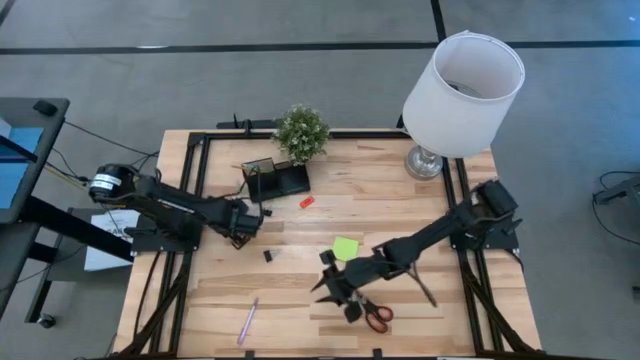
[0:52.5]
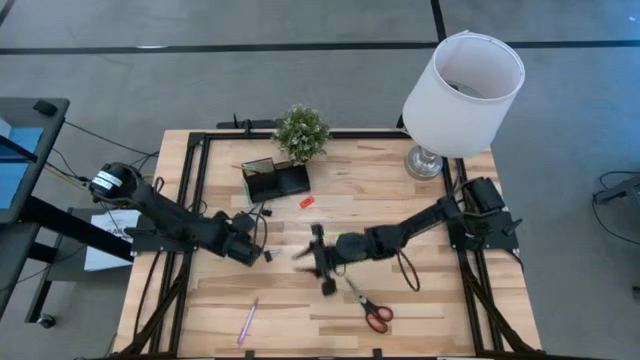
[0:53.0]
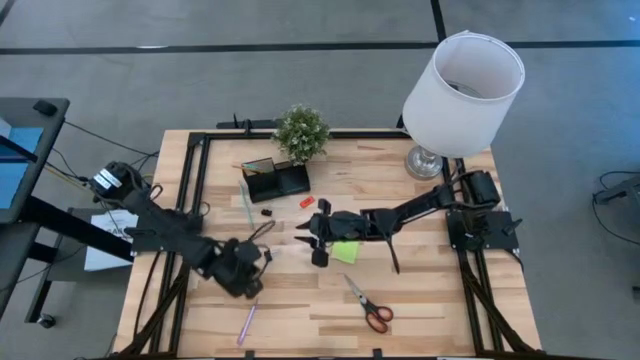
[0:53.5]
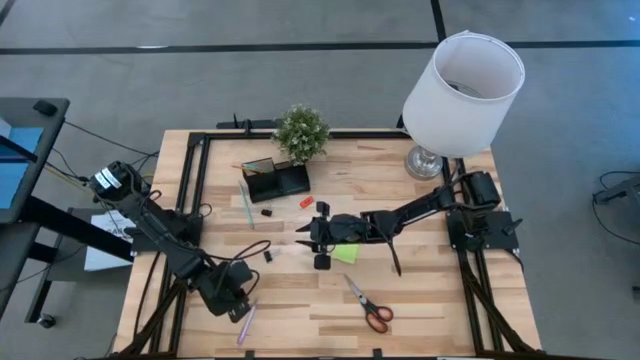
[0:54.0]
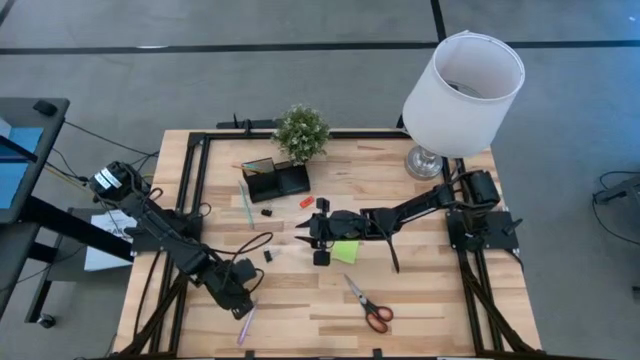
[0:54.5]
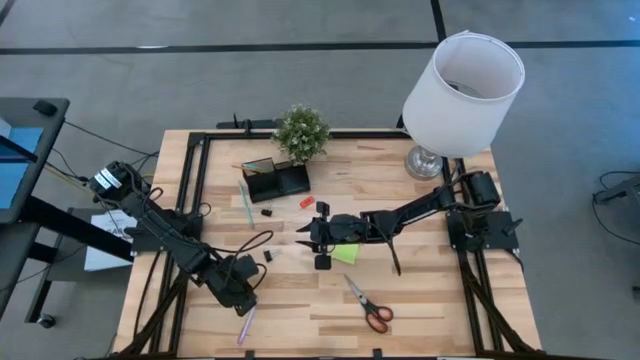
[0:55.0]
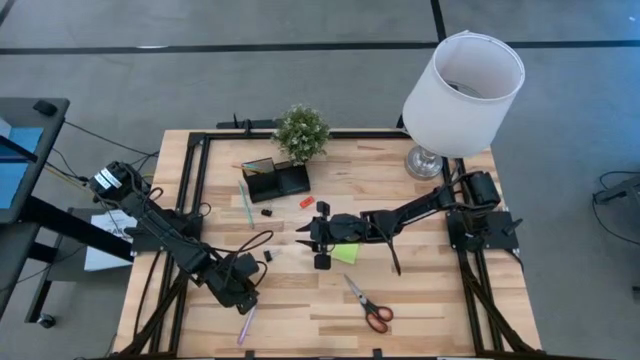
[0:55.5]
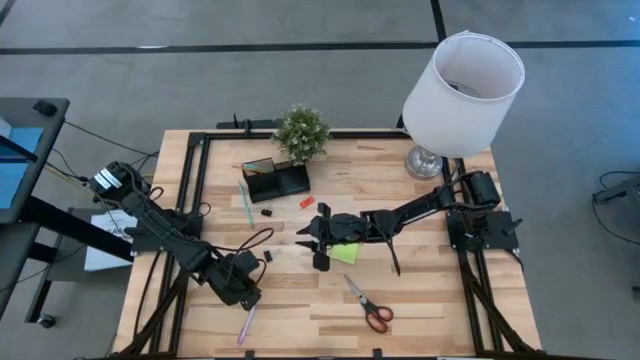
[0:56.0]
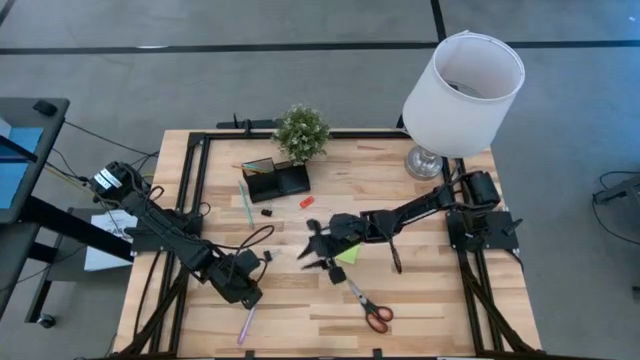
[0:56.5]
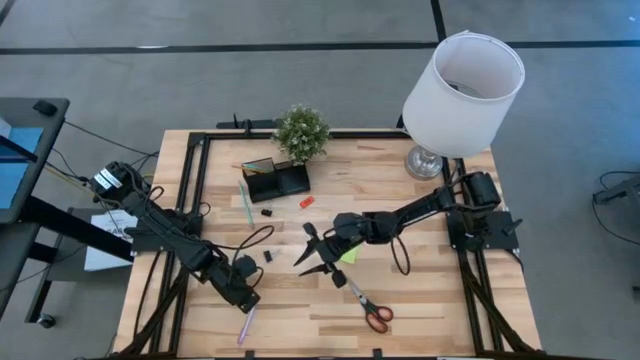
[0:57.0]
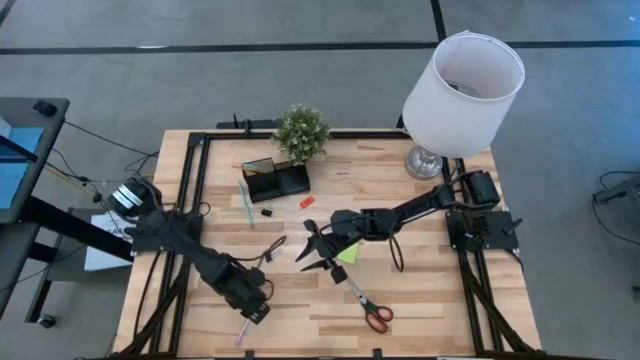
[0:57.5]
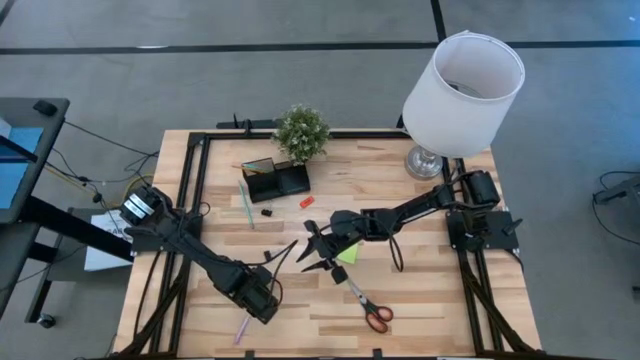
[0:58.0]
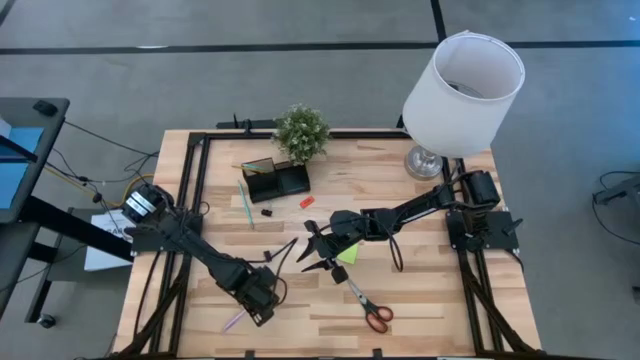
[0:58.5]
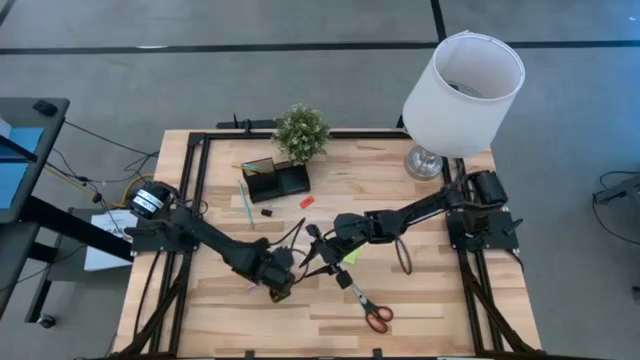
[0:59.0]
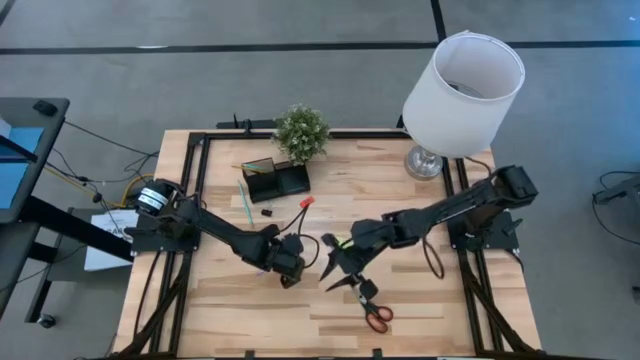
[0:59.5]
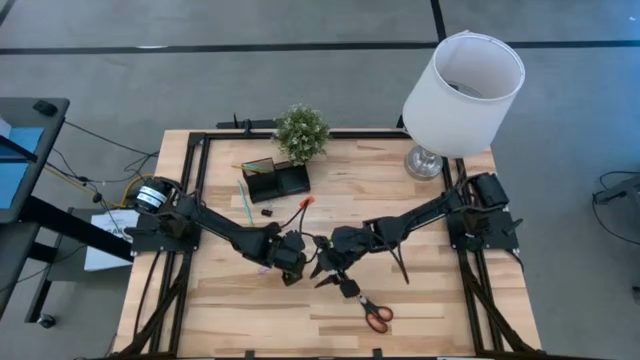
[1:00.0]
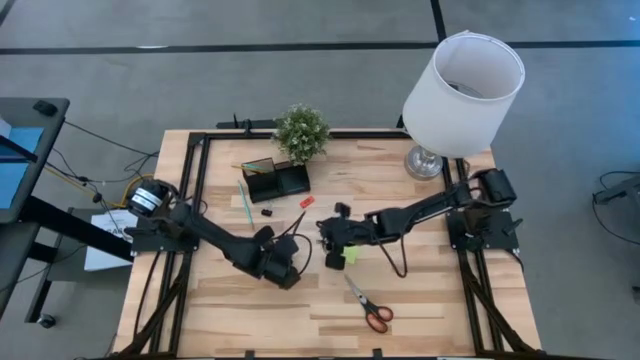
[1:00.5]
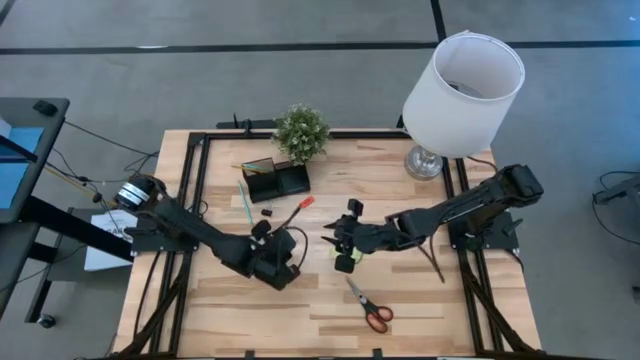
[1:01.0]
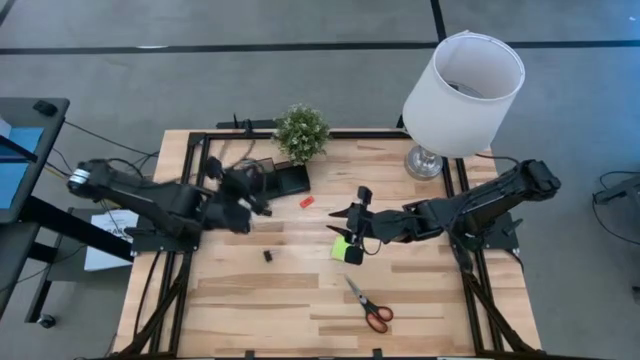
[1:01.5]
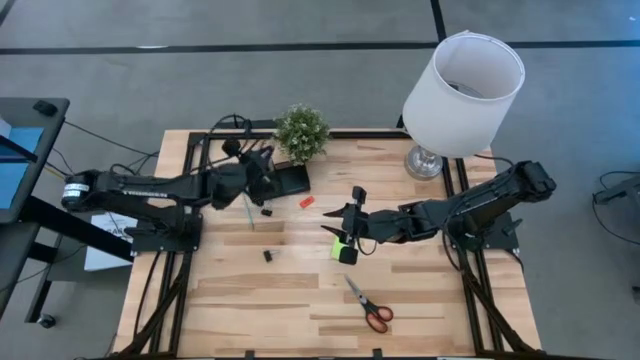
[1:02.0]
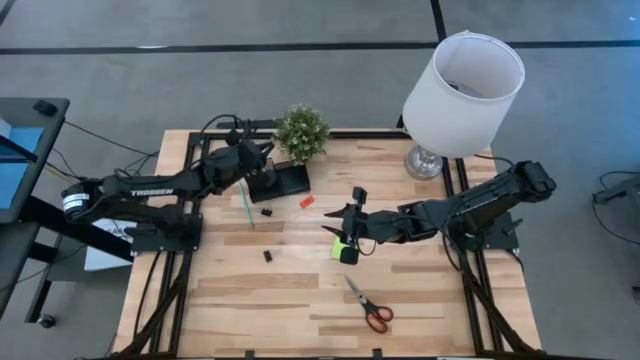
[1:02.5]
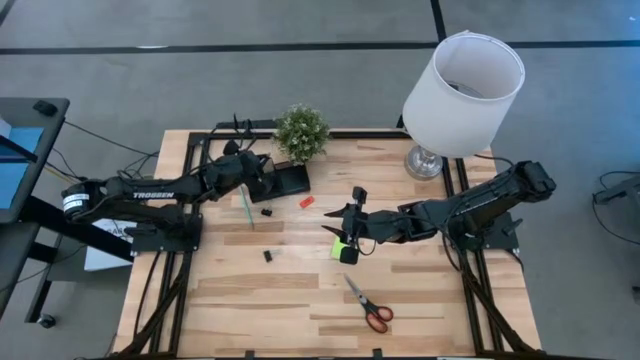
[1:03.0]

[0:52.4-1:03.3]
Task: Pick and place office supplies into organizer
Put the purple pen into the black organizer

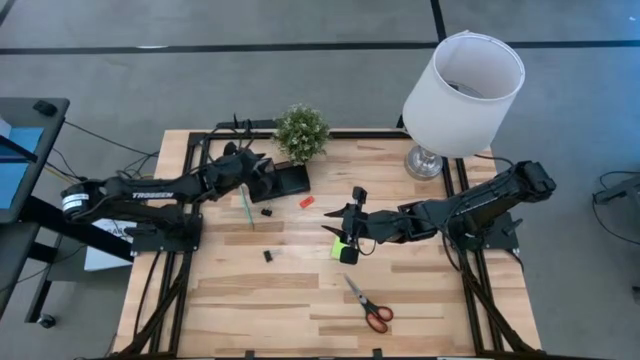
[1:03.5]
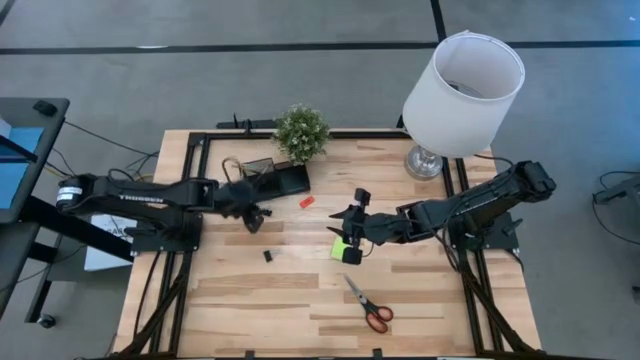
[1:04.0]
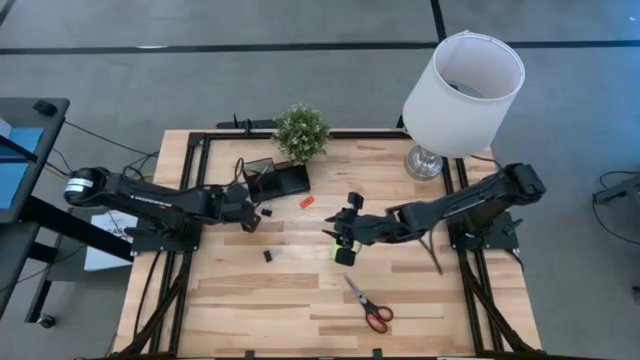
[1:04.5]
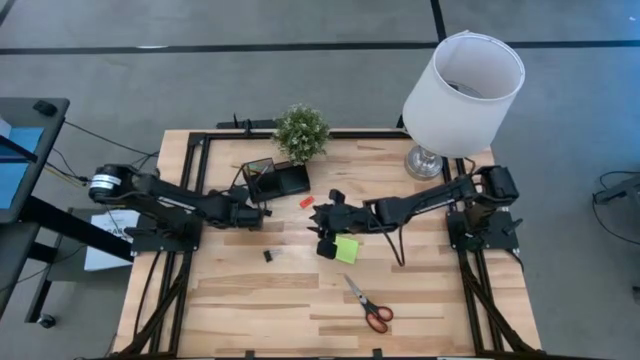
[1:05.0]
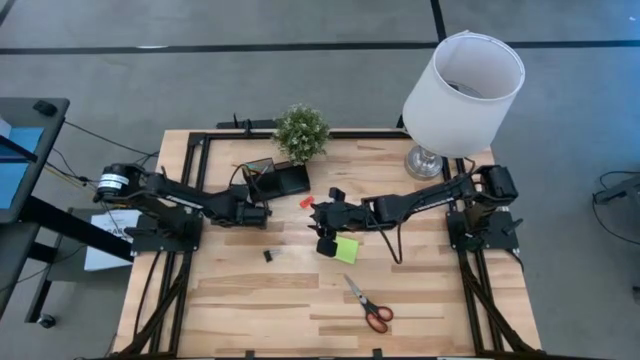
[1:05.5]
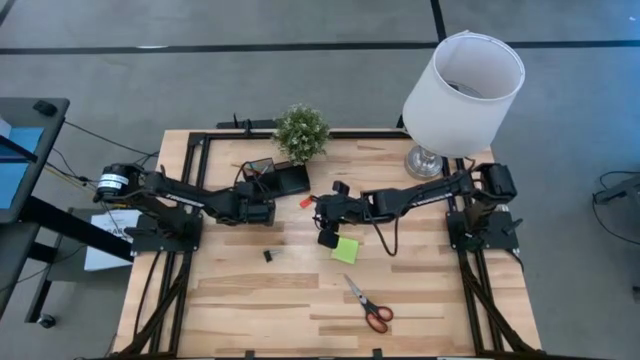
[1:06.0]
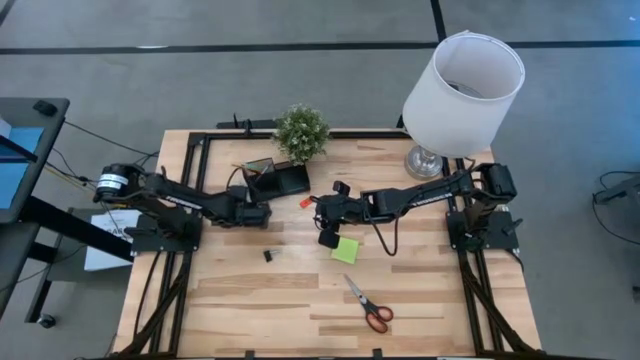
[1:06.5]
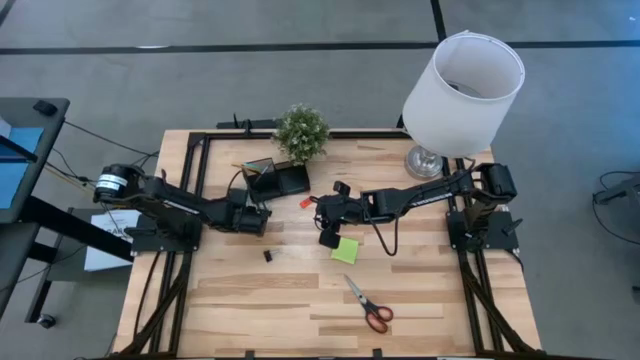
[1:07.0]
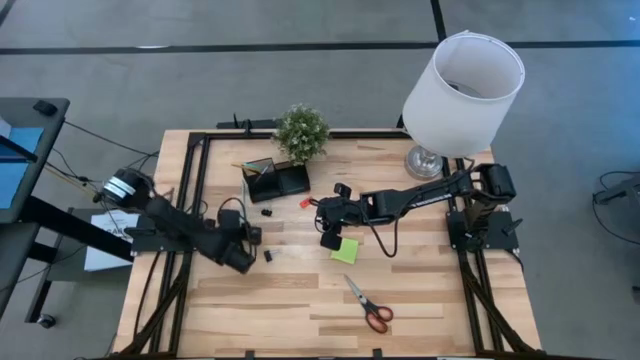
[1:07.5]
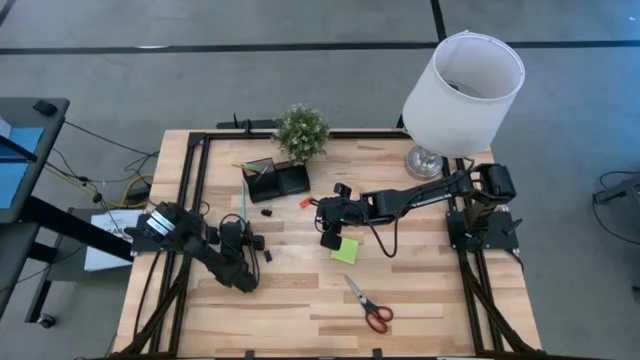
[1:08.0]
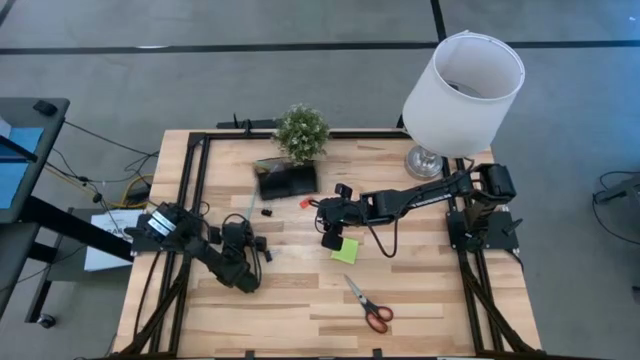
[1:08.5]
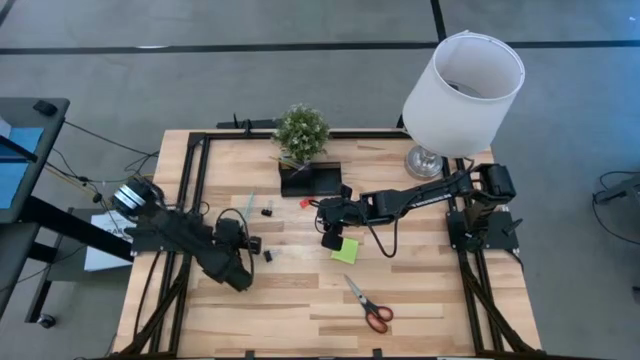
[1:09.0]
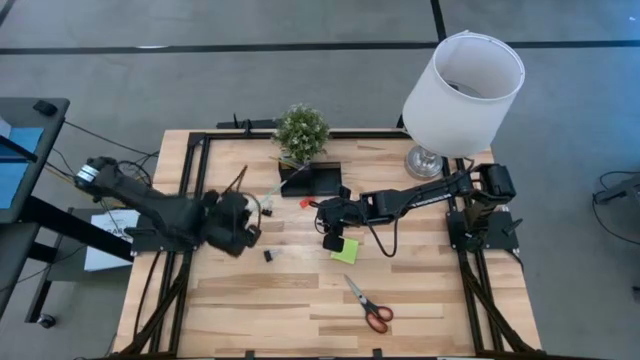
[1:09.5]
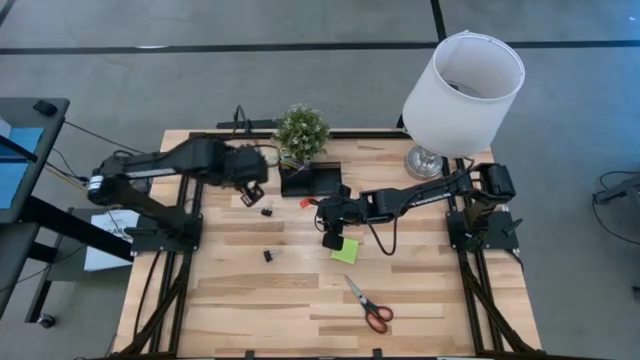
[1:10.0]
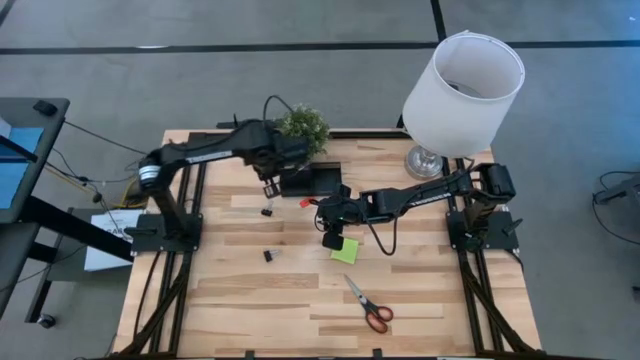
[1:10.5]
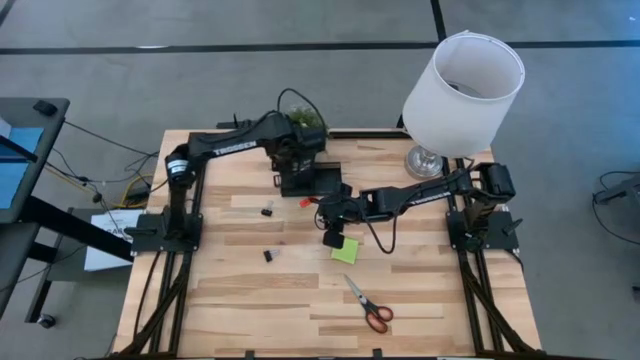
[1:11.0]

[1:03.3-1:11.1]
Put the sky blue pencil into the black organizer

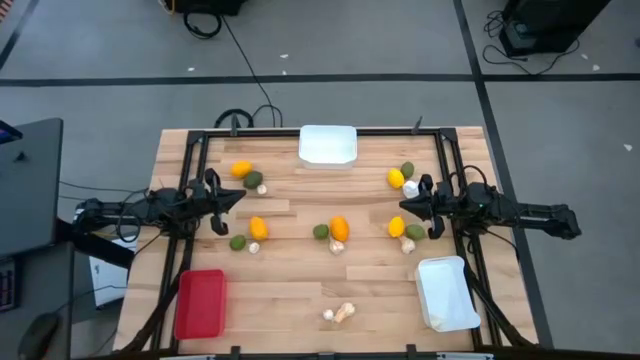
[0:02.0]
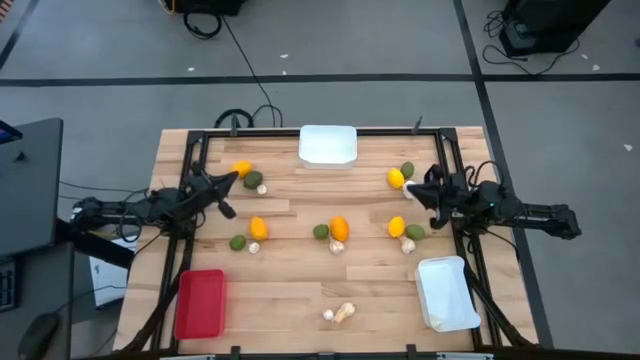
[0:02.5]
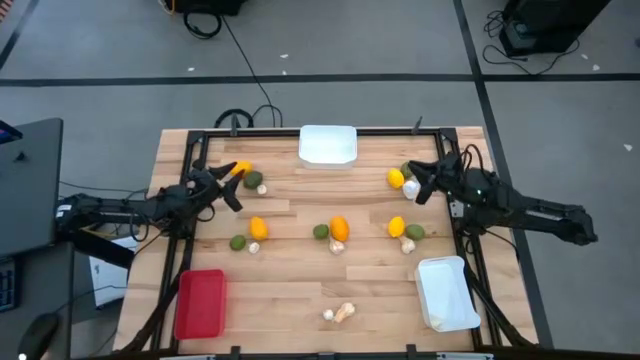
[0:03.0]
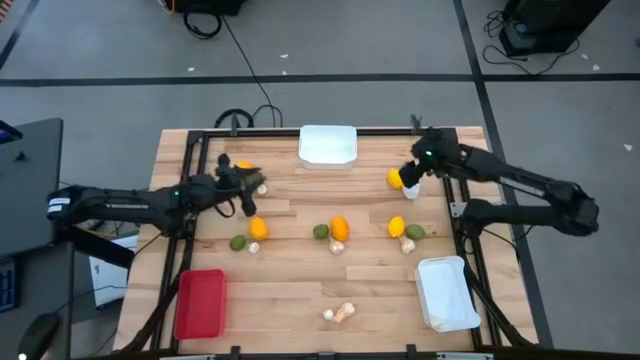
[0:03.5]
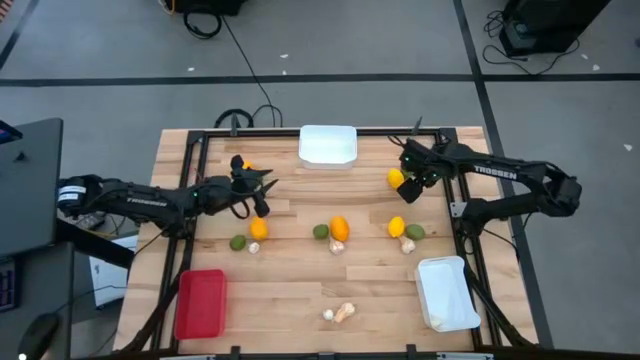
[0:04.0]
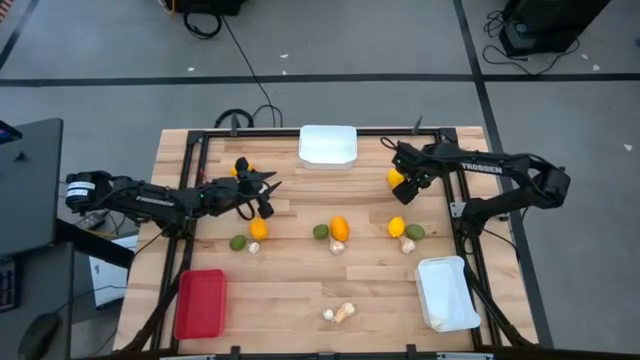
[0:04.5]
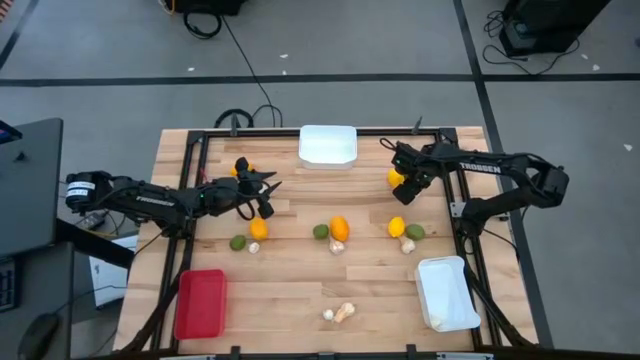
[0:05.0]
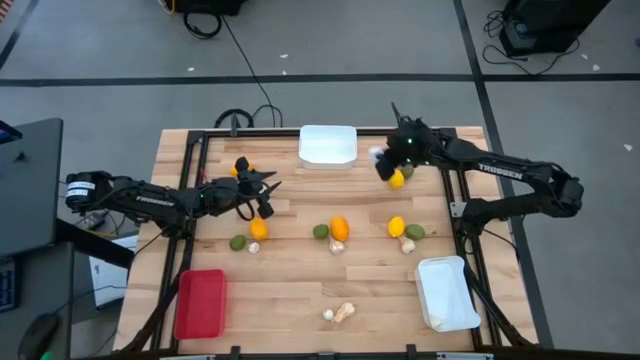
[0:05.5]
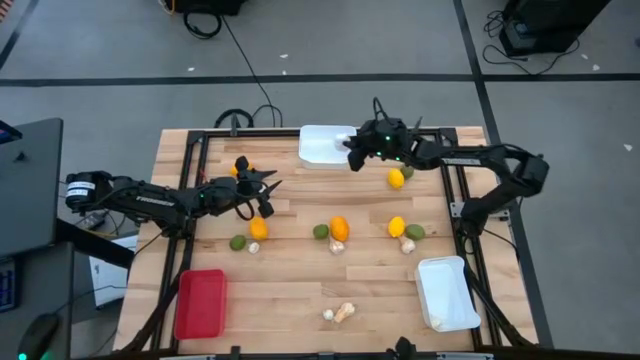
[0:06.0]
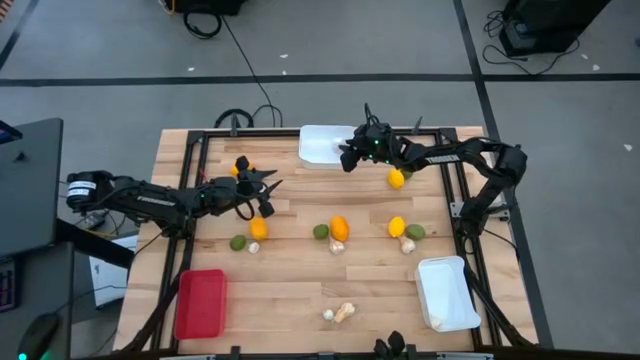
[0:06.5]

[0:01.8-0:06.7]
Task: Sort produce into baskets
Put the garlic into the top white bin
